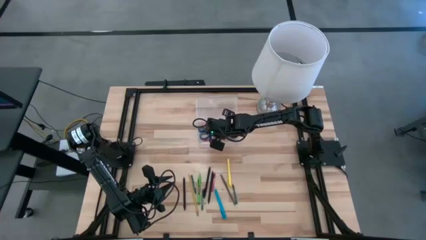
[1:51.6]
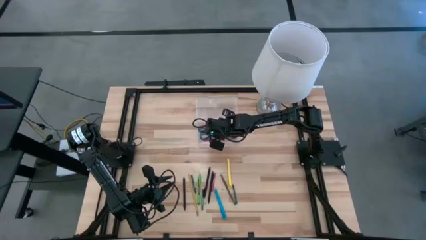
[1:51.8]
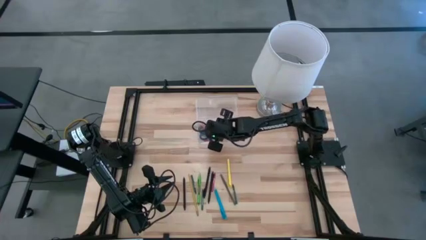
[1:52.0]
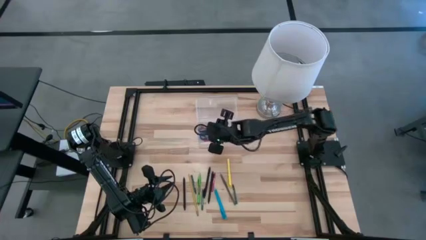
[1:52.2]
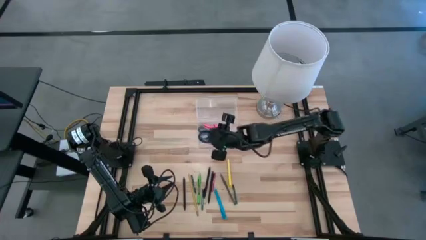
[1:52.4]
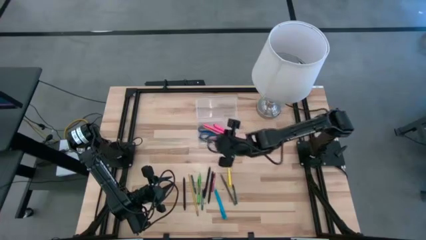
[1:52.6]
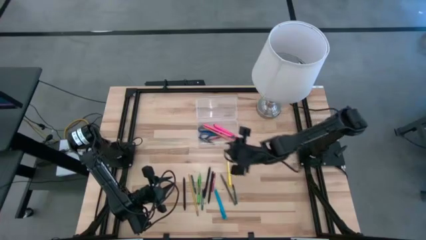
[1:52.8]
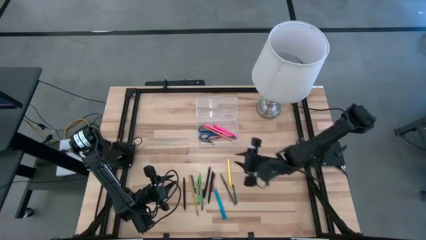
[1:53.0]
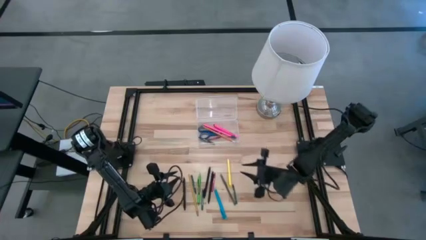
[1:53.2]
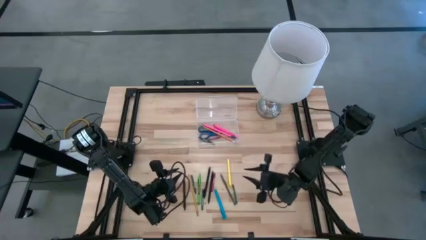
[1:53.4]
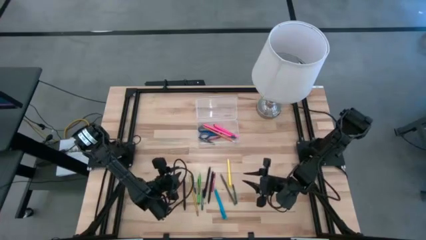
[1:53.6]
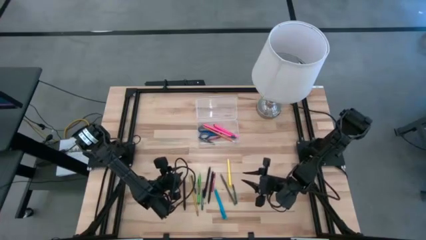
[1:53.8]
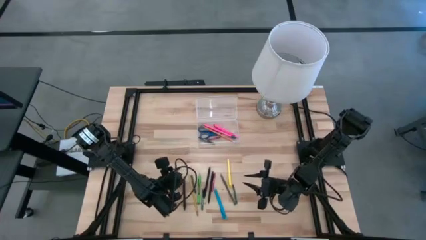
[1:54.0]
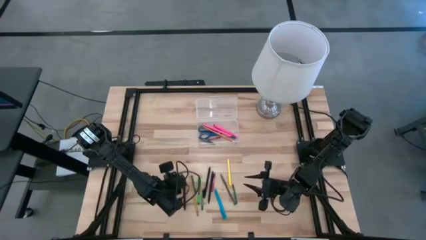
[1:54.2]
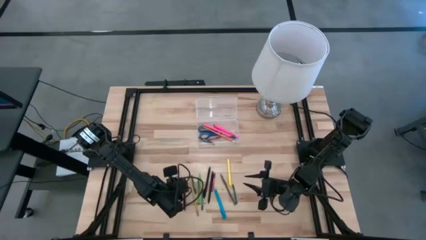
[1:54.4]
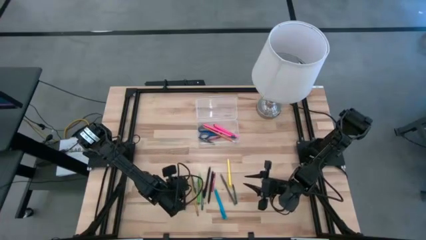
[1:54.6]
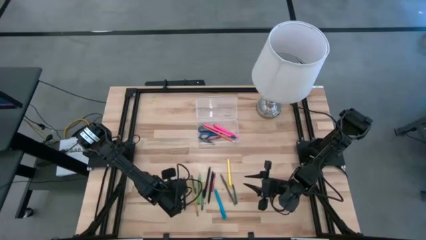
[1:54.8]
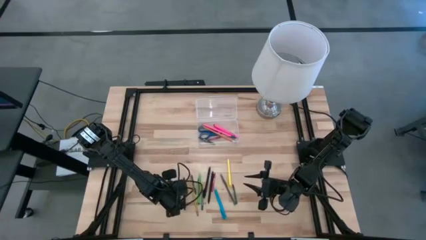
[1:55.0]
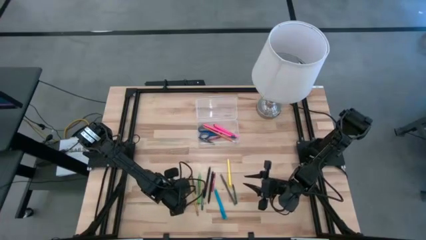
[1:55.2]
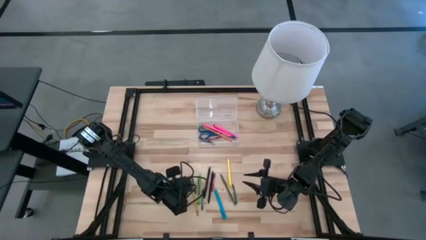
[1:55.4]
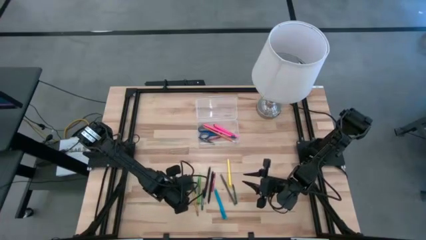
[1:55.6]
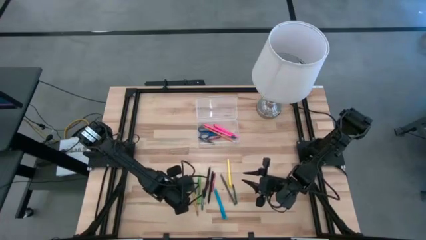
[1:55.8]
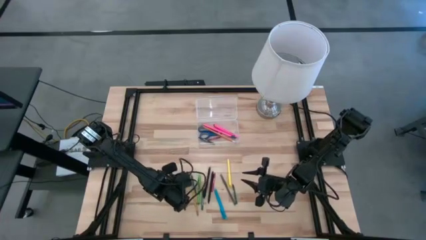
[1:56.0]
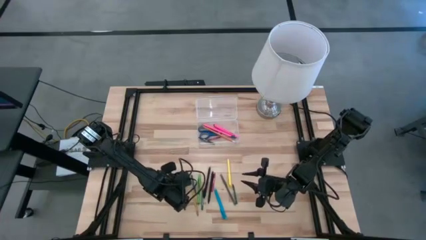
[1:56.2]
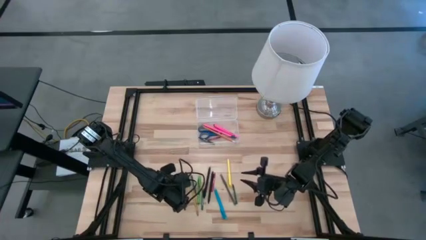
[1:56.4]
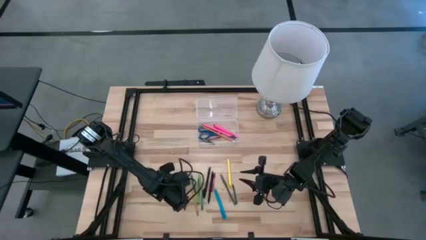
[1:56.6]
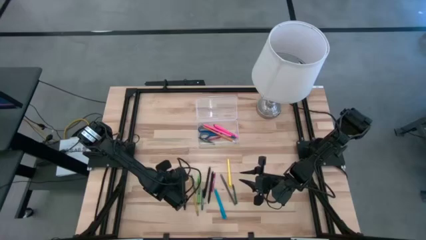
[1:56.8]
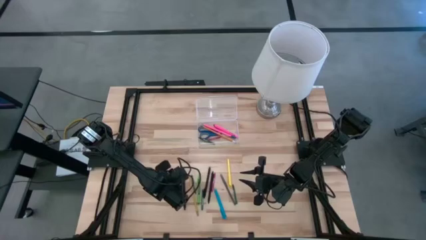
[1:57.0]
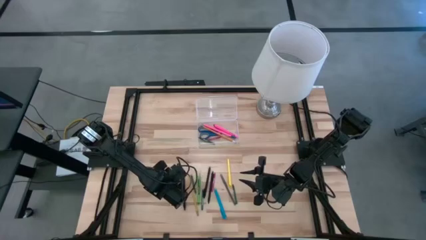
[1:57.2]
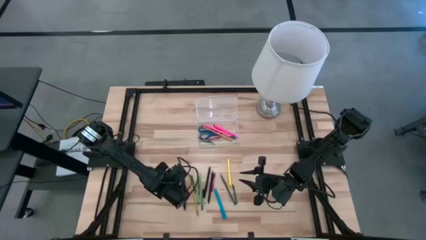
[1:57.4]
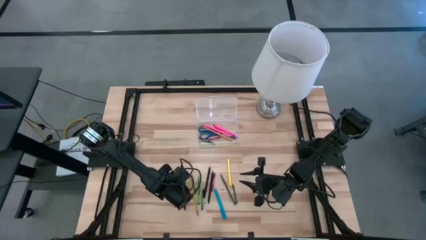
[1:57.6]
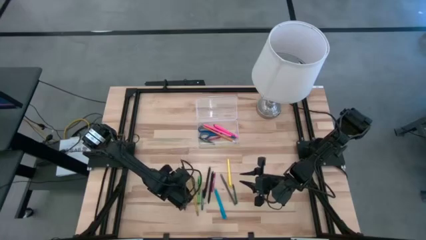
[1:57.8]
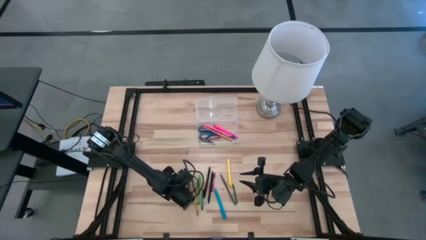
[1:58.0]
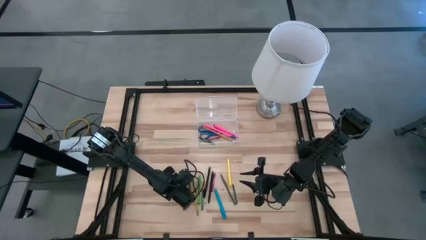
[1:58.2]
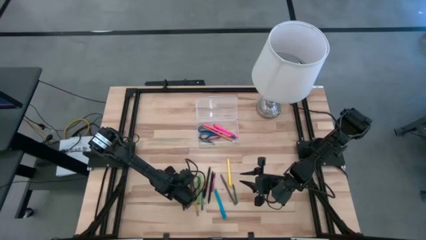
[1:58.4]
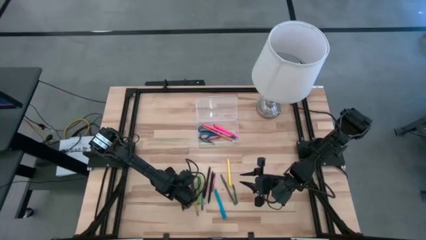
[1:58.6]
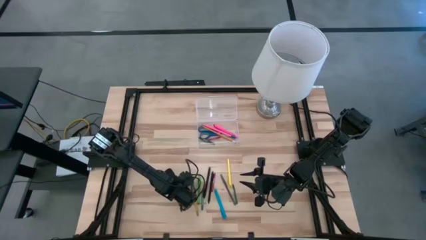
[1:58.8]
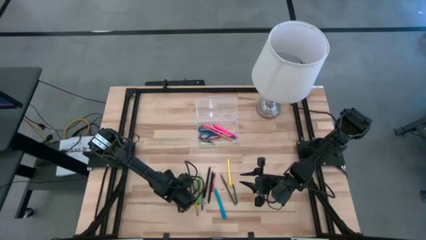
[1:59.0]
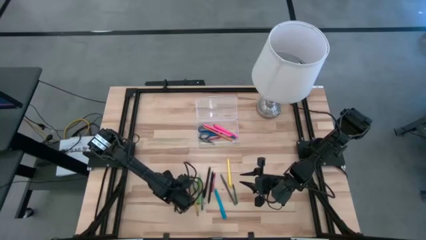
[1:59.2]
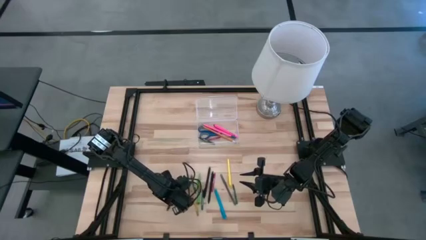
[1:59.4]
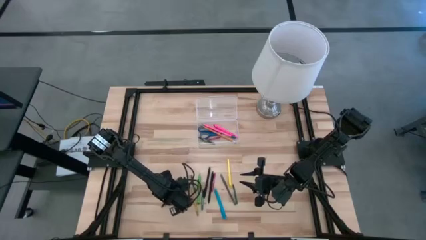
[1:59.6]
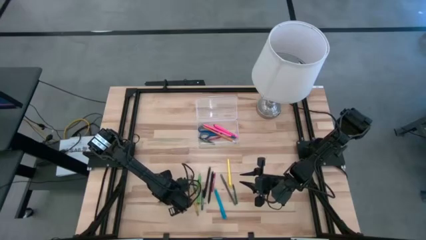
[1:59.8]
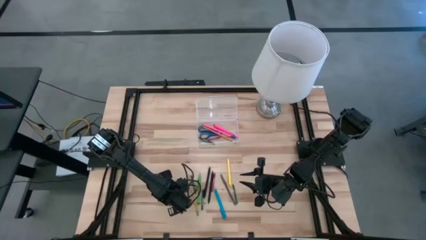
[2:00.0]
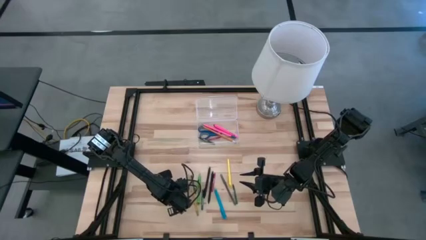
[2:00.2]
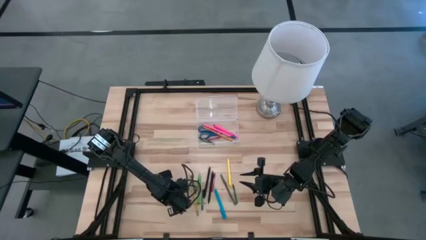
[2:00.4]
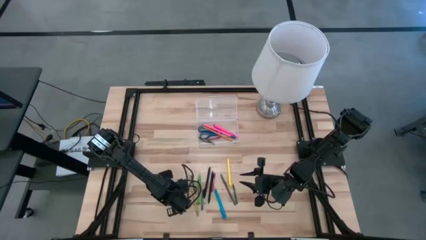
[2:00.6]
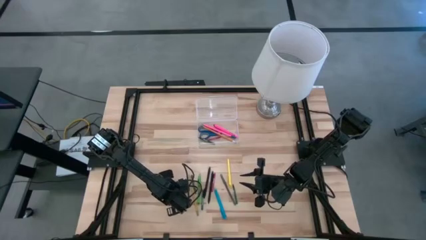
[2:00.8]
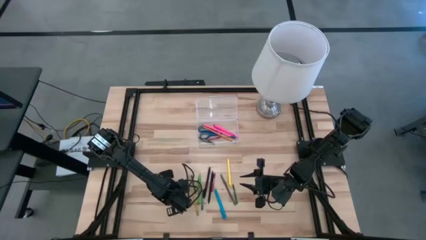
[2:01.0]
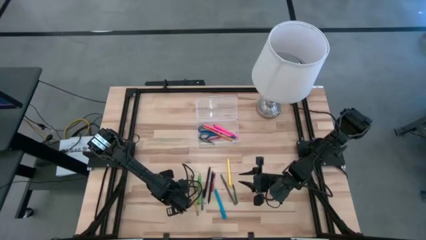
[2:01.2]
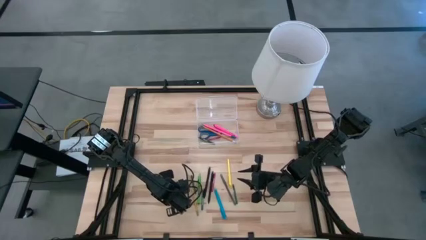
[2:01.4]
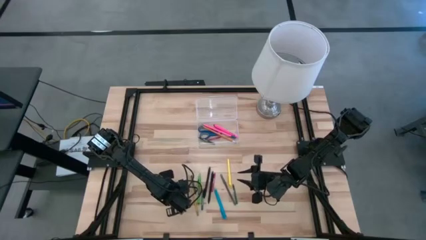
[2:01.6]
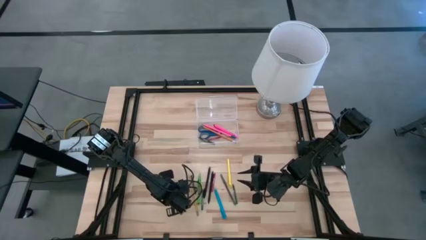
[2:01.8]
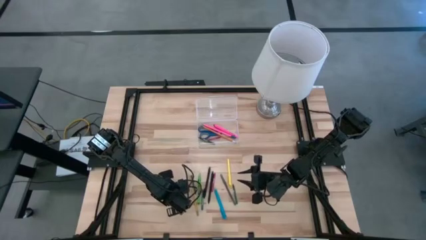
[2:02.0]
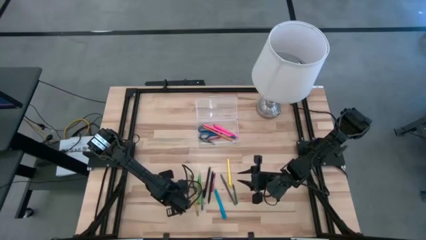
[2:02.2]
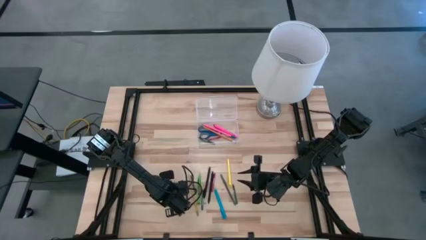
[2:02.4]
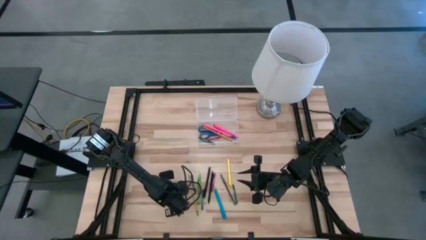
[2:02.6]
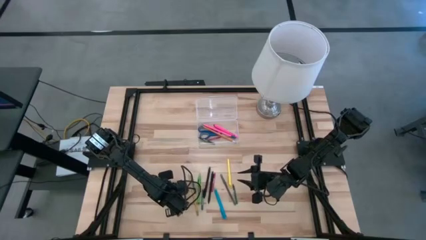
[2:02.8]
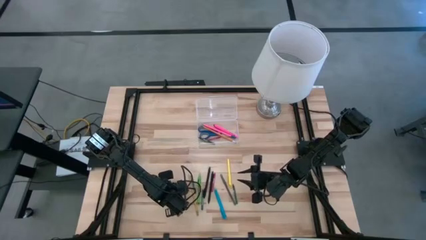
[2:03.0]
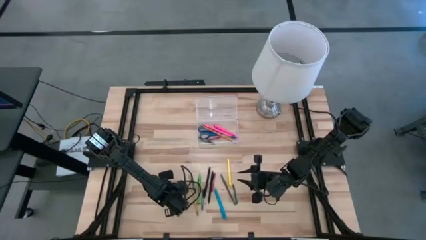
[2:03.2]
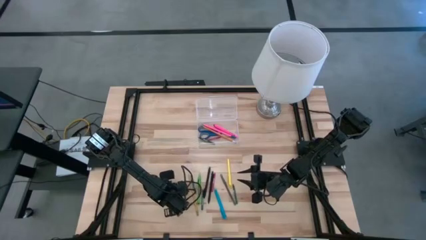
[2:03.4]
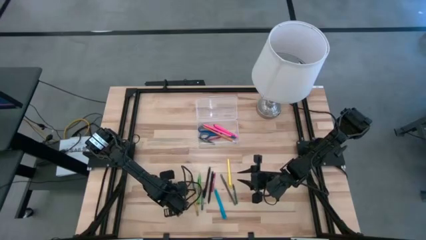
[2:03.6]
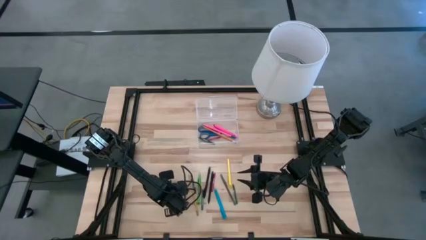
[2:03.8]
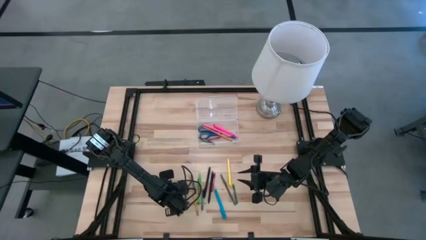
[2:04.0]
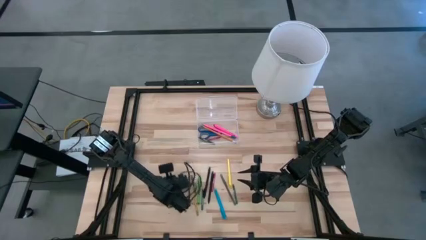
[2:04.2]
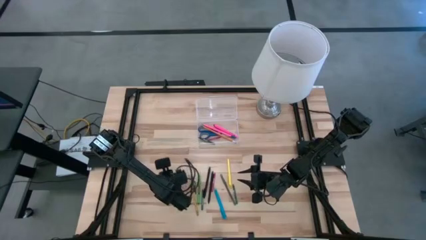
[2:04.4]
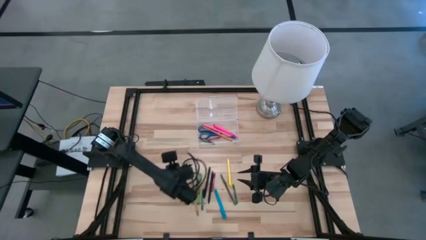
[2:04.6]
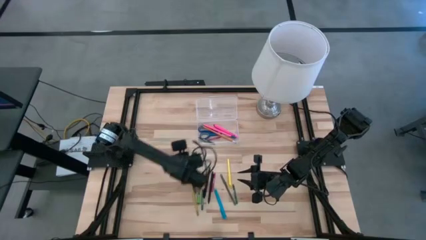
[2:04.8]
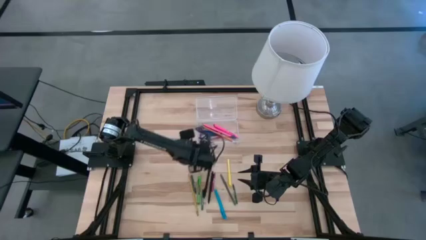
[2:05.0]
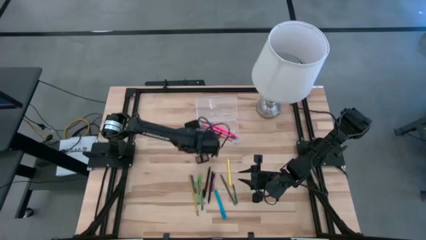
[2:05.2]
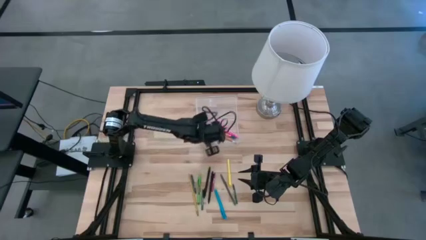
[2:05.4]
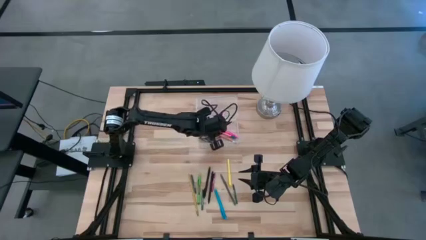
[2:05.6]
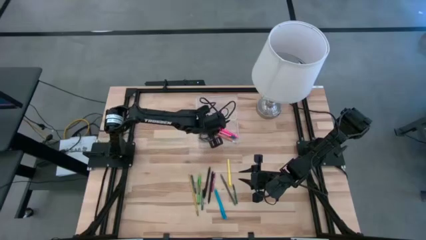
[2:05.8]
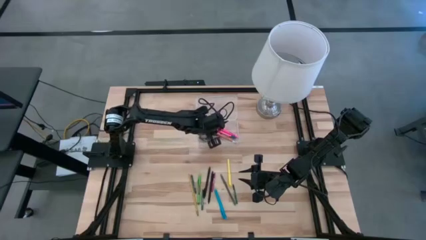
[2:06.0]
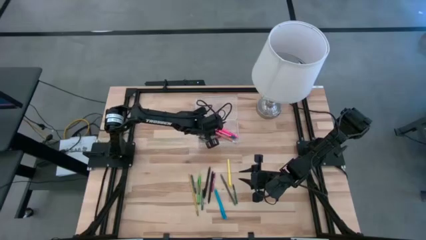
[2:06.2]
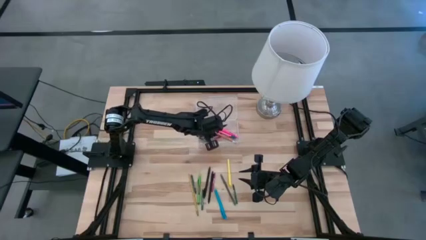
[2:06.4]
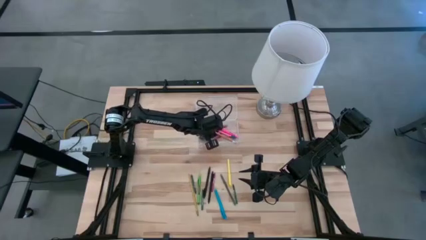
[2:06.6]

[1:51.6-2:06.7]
Task: Pick & place school supplies into a supply box
Put the left black pen into the supply box
